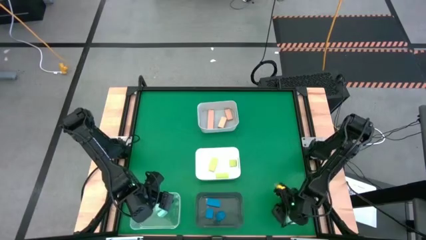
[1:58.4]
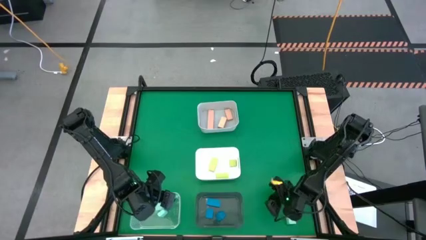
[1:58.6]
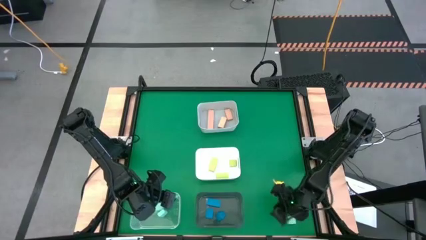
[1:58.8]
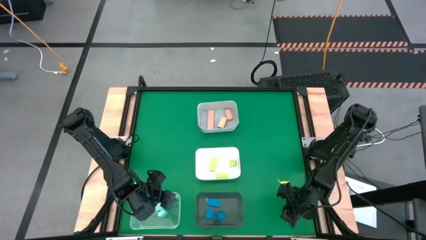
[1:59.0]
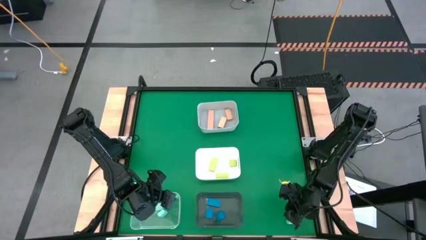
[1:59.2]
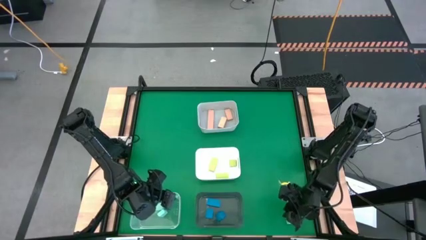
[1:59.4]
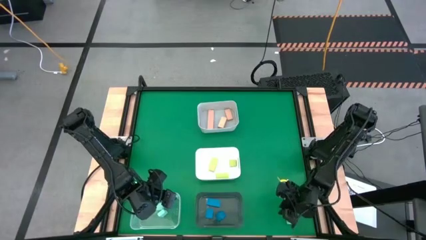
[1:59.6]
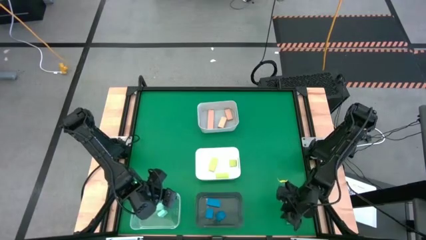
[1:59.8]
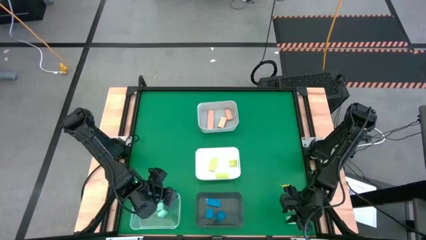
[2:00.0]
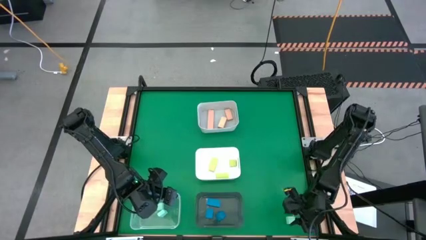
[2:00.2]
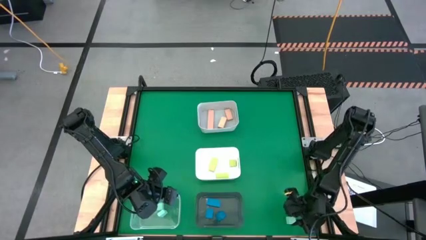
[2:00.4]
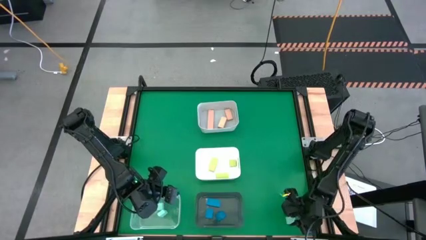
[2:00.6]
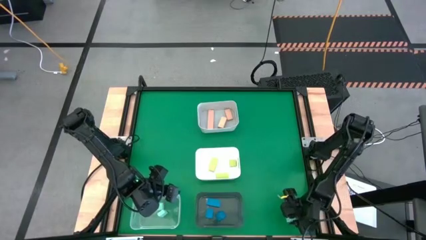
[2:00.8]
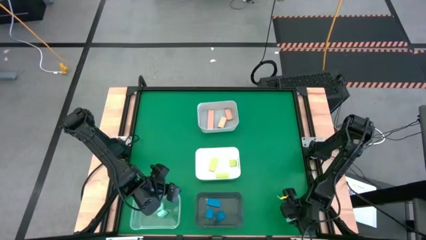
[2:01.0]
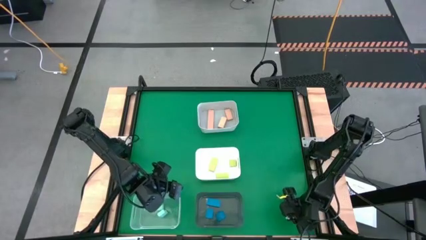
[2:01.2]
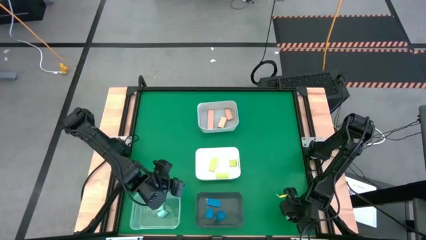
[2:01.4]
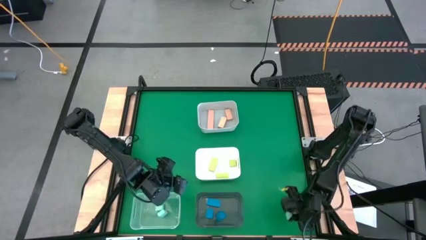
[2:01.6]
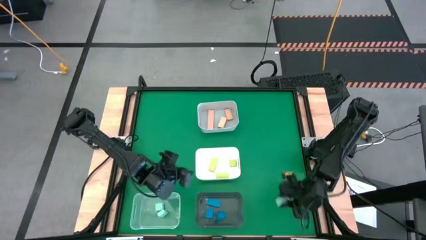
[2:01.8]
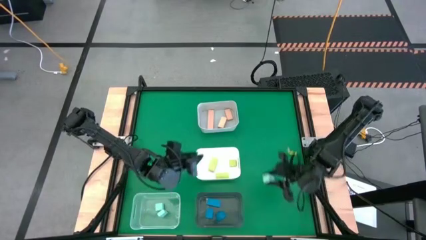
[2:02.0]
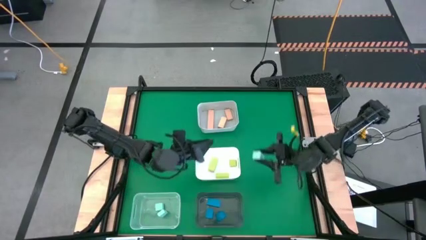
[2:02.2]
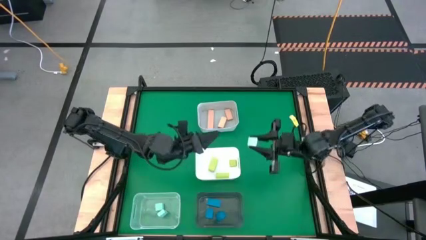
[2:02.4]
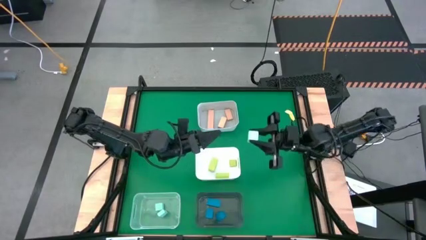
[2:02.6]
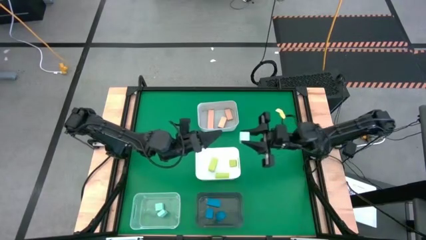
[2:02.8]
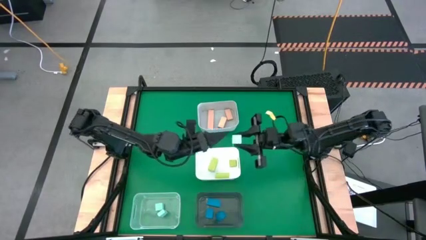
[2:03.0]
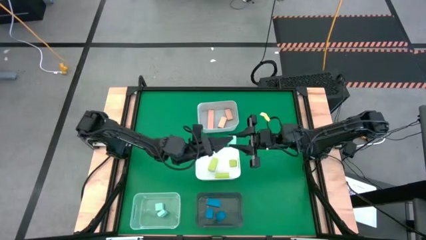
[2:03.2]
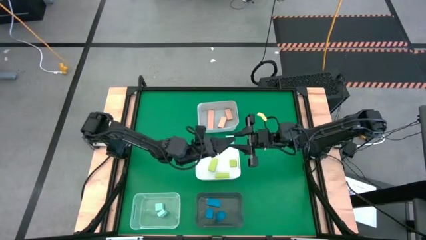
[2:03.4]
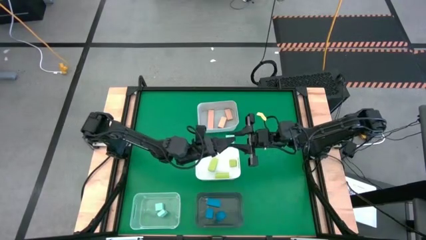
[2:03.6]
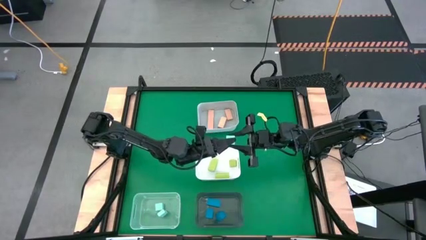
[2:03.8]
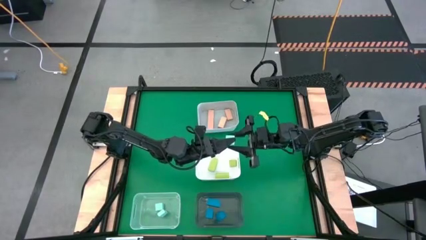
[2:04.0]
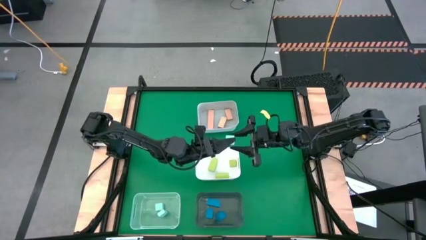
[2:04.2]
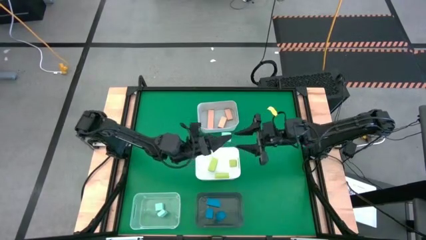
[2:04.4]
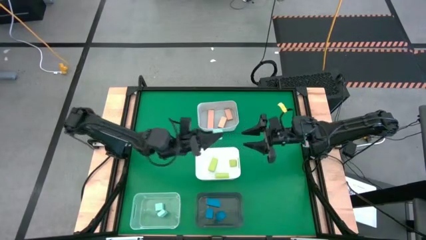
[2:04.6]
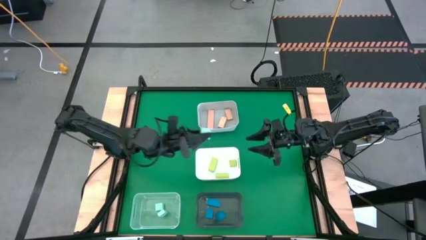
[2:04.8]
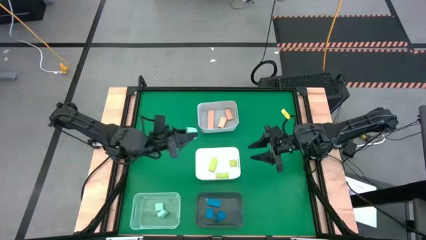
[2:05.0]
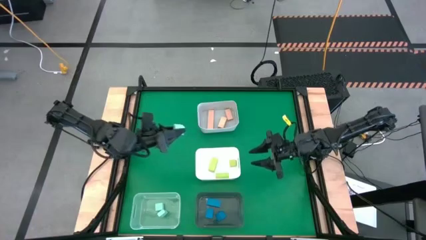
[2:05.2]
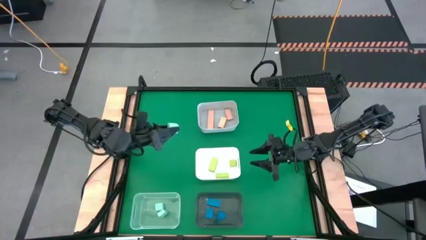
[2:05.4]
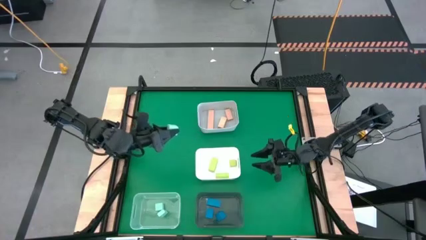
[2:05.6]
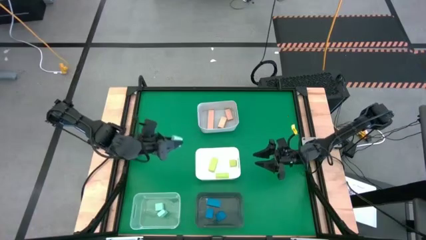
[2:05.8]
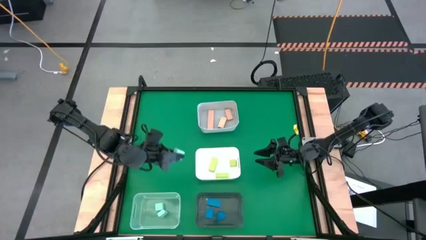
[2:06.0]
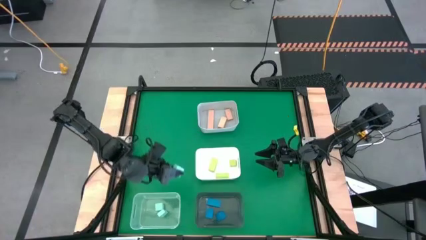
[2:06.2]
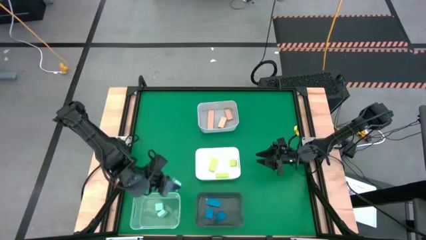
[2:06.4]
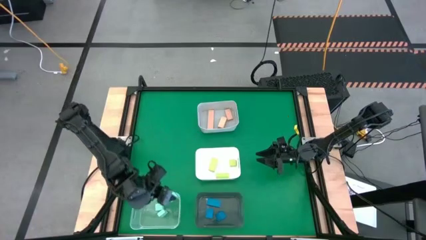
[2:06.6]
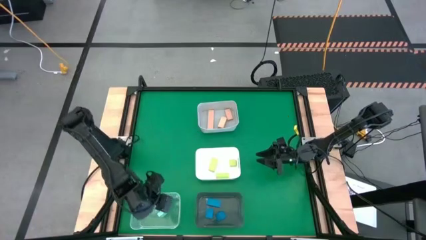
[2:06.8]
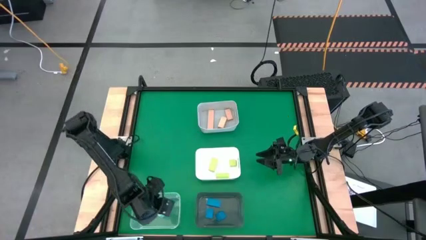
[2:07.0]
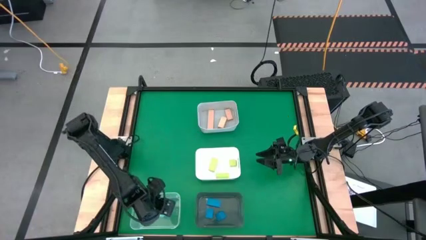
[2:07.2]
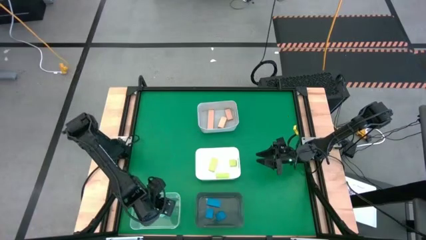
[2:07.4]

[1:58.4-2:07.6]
Task: Sort & place blocks by color
Put the light blue block into the transparent bin

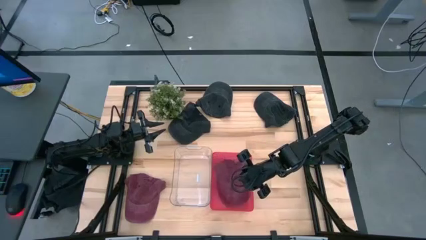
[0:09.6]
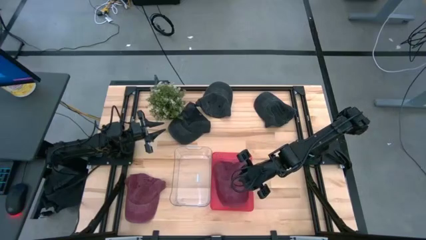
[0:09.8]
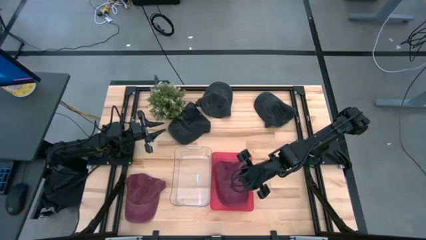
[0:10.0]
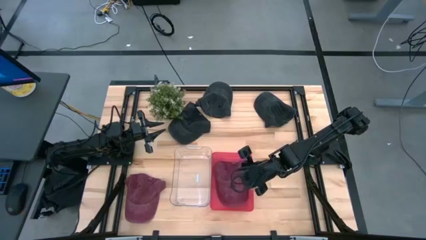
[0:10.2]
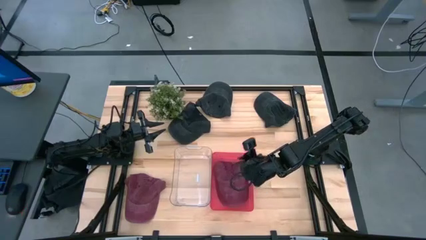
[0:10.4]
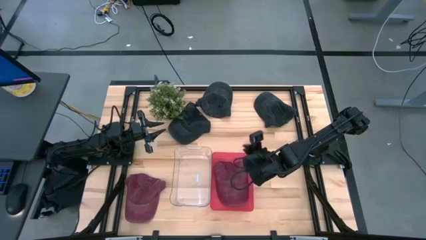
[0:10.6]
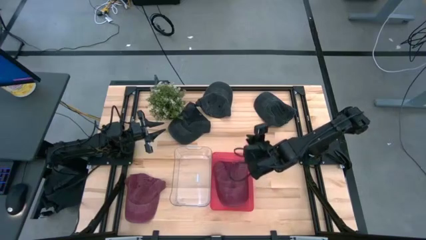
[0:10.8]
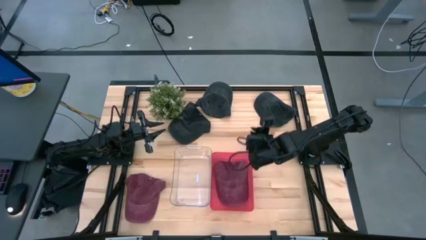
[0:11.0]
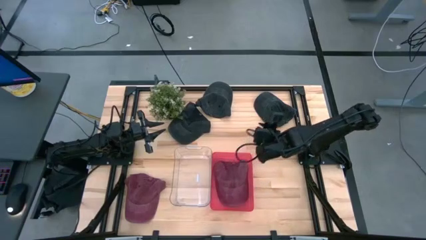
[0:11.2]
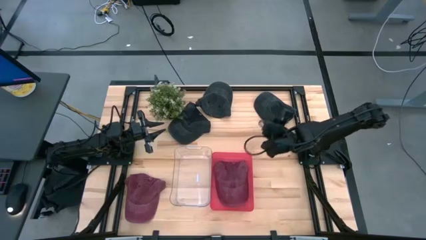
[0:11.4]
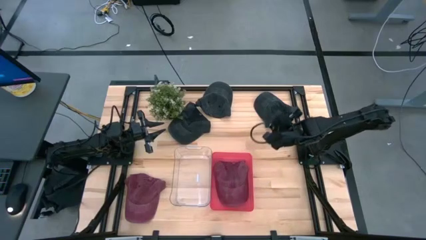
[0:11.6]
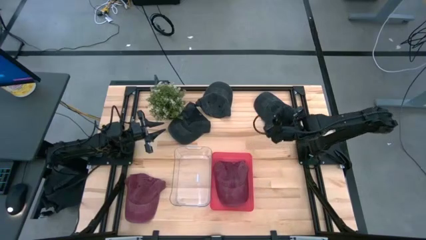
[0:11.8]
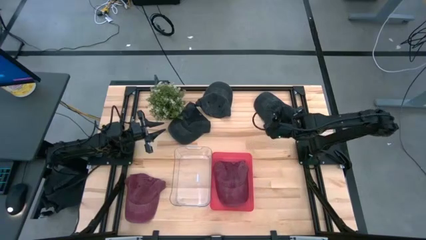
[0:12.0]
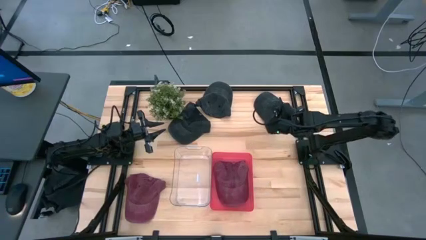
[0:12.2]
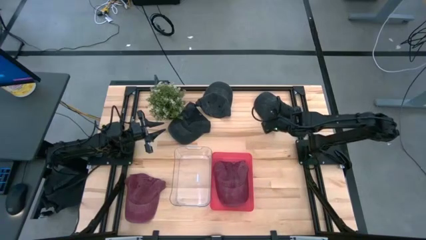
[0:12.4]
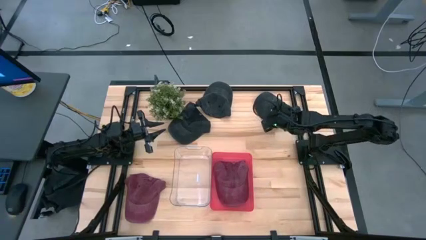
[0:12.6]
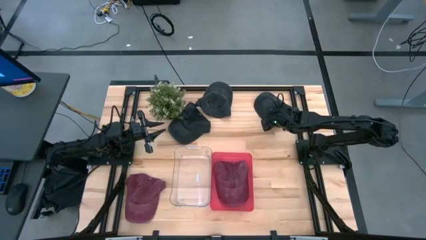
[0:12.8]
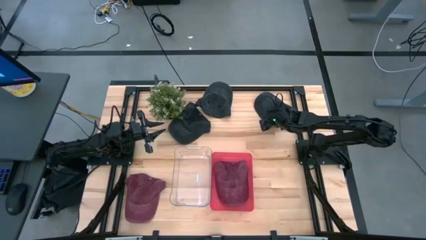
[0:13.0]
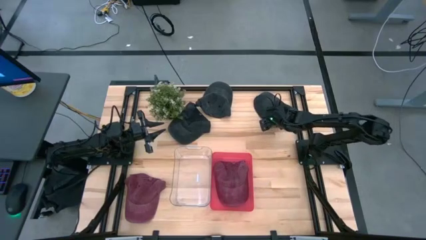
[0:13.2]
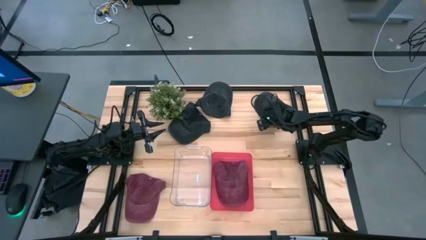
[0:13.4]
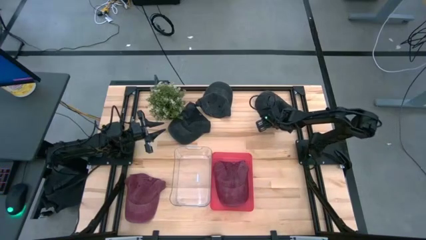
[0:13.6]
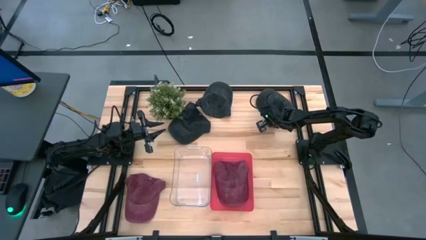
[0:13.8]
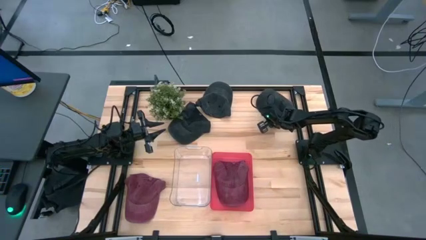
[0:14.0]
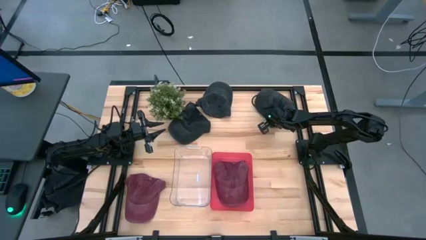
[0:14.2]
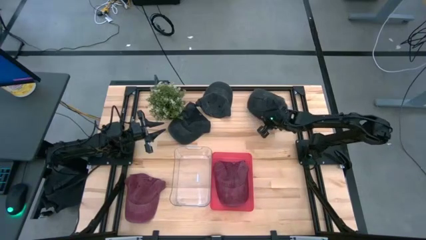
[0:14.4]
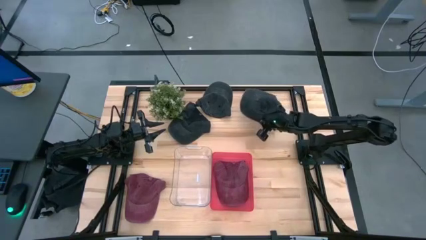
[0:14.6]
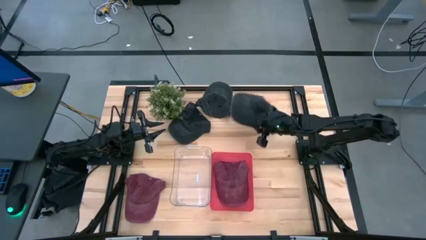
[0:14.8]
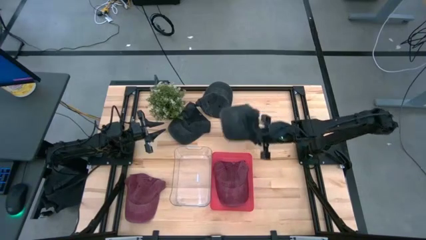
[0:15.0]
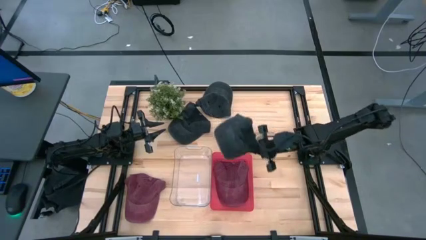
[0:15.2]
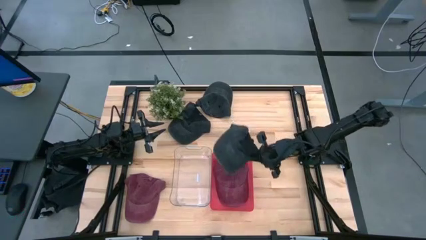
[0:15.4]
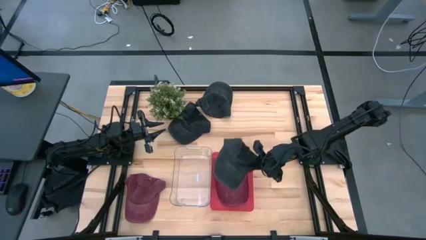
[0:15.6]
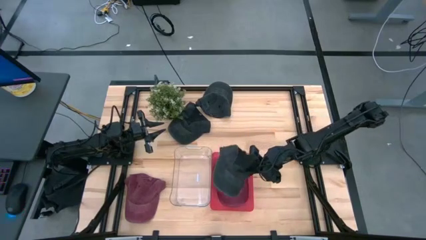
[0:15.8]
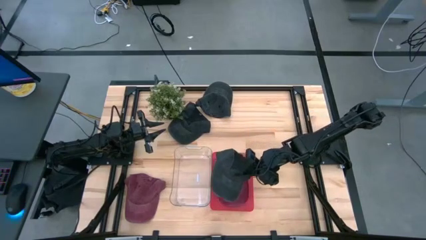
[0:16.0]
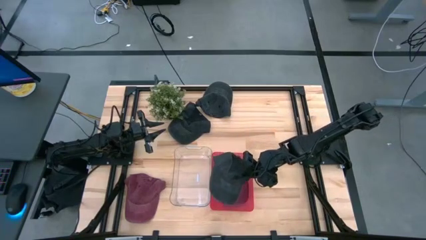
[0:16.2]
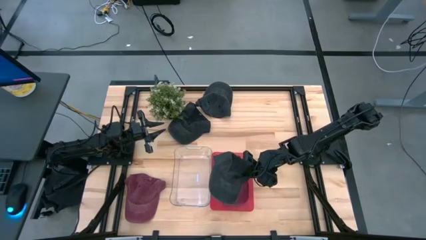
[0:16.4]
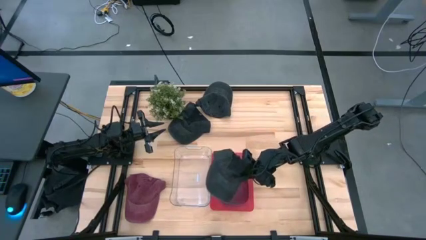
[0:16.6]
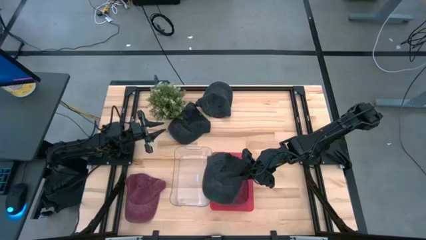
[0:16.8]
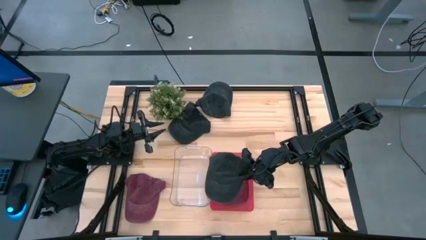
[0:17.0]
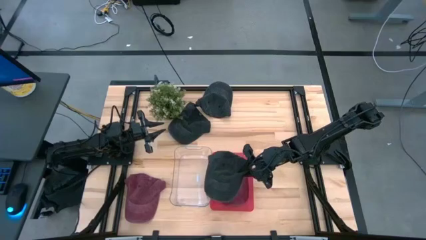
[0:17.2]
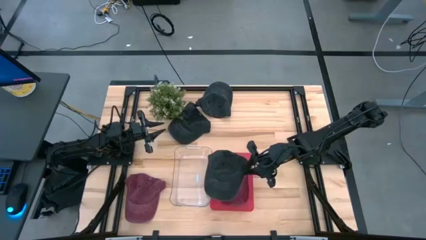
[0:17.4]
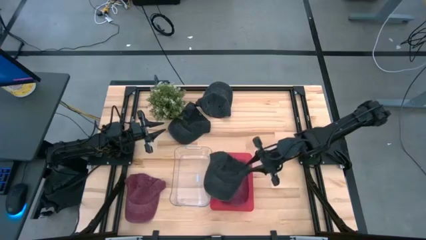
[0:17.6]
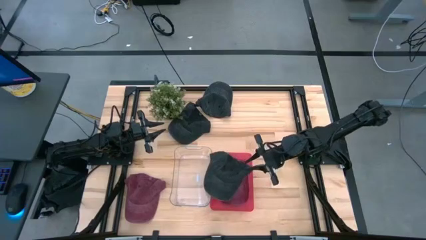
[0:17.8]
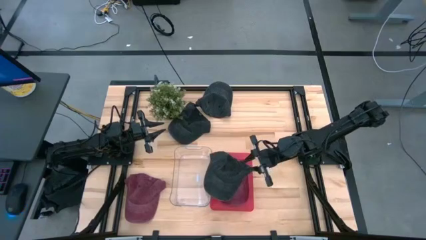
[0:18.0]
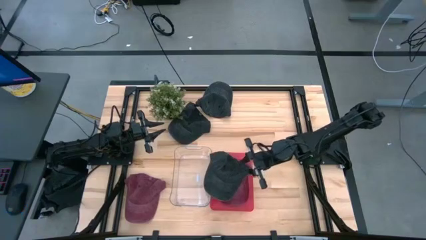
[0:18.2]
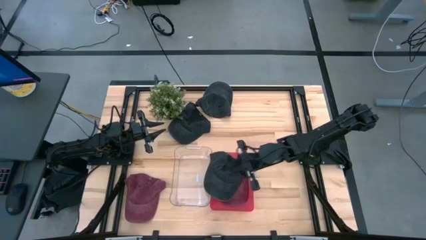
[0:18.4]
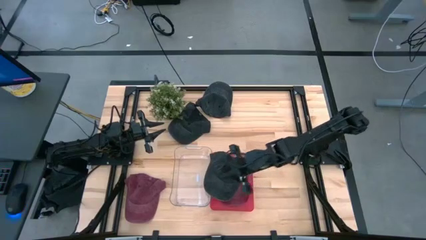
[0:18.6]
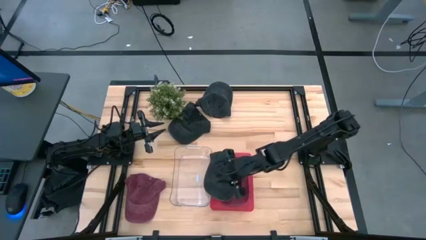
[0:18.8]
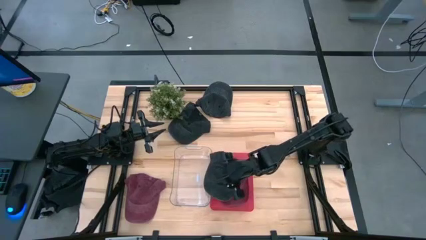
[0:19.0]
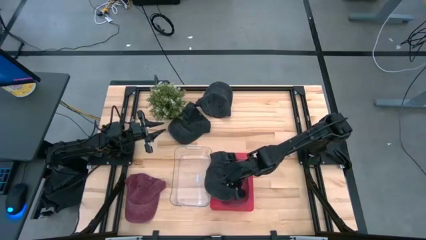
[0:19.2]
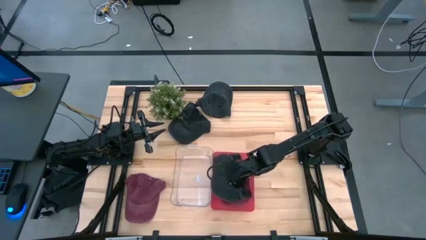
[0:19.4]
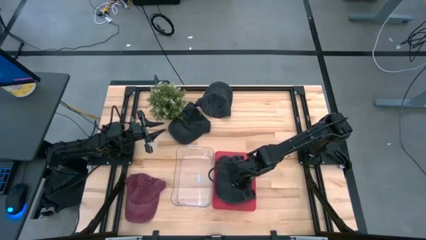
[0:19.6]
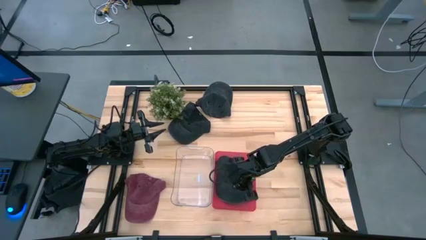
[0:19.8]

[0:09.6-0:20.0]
Task: Pick & Place hat
Put the top right black cap into the transparent bin
